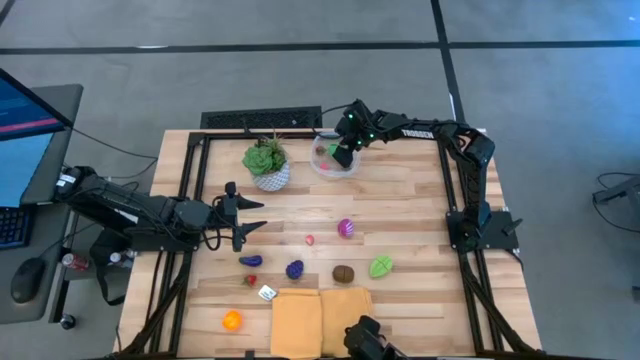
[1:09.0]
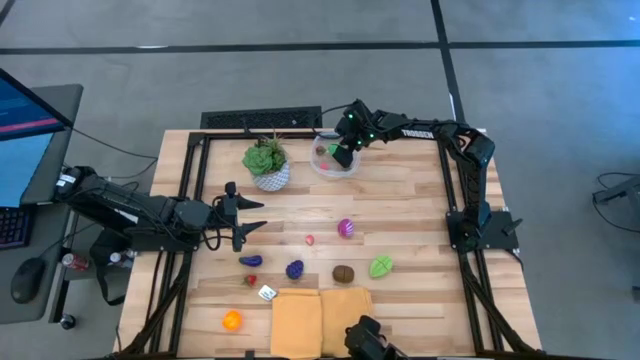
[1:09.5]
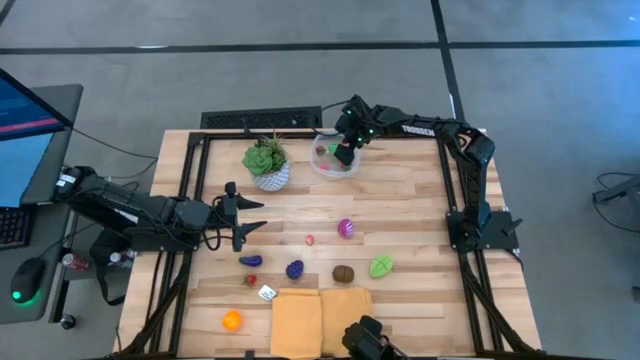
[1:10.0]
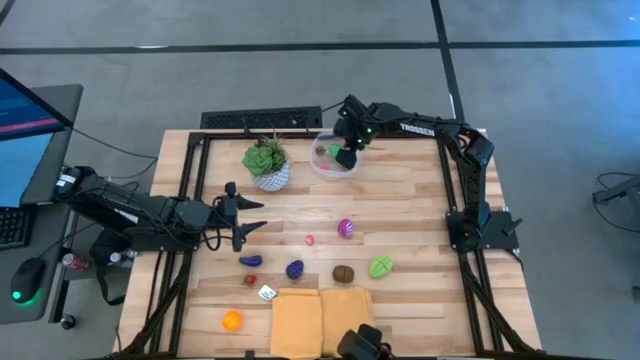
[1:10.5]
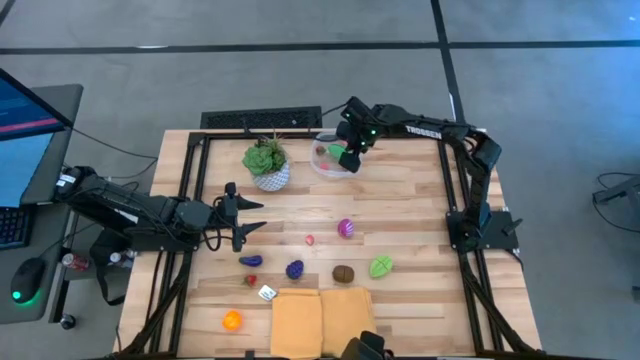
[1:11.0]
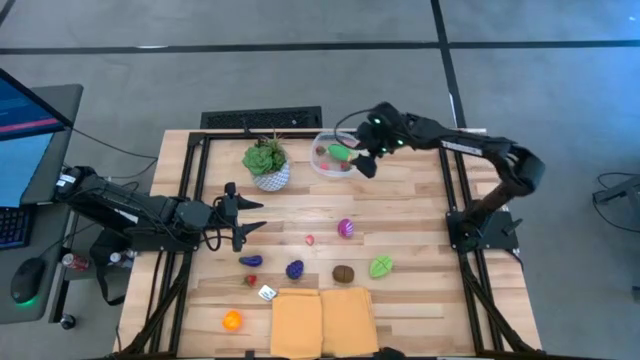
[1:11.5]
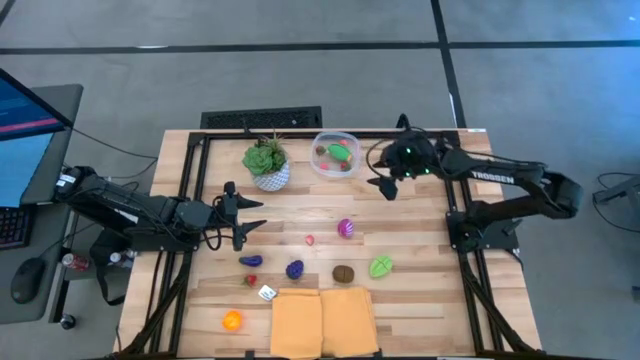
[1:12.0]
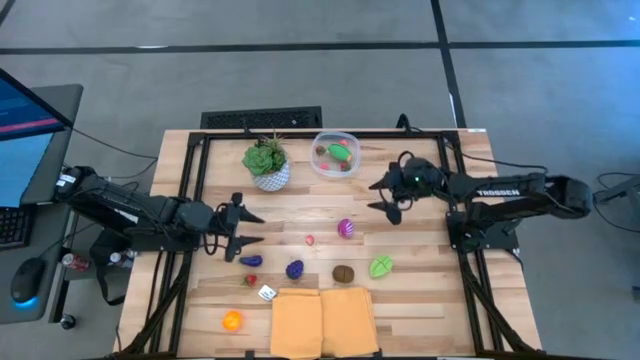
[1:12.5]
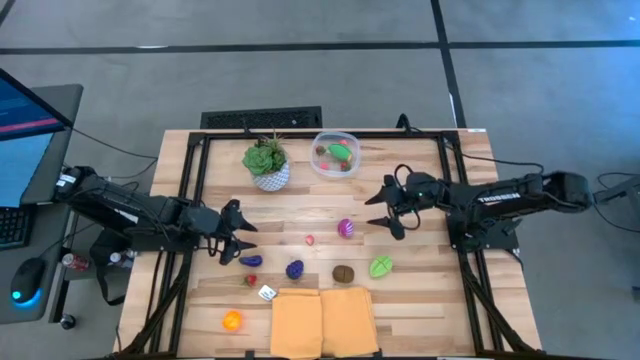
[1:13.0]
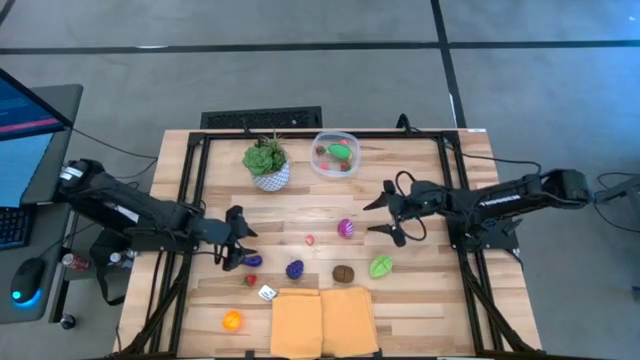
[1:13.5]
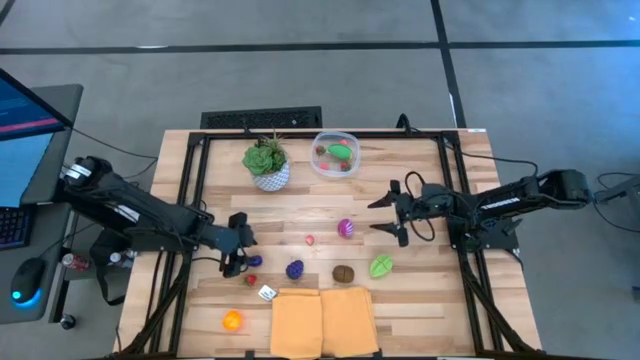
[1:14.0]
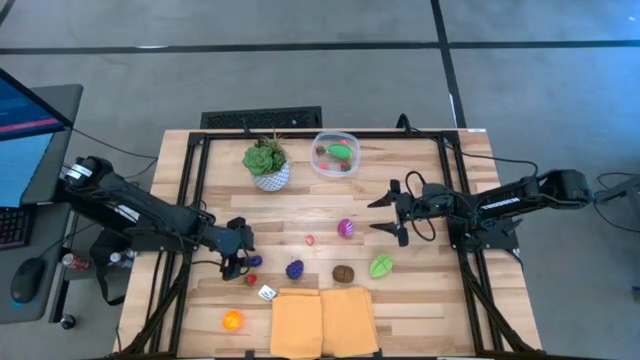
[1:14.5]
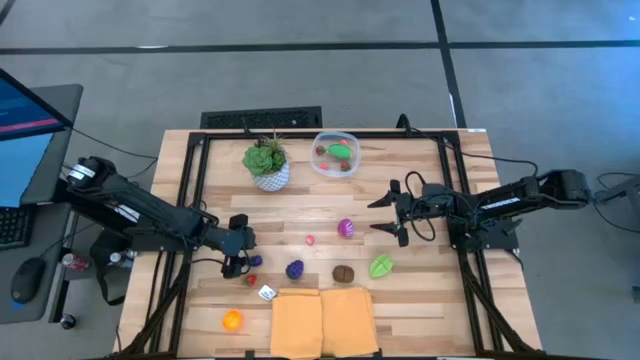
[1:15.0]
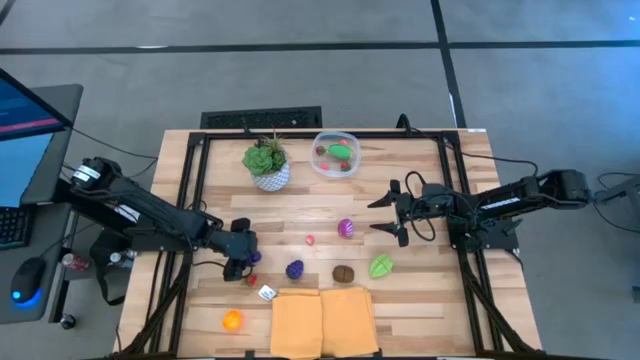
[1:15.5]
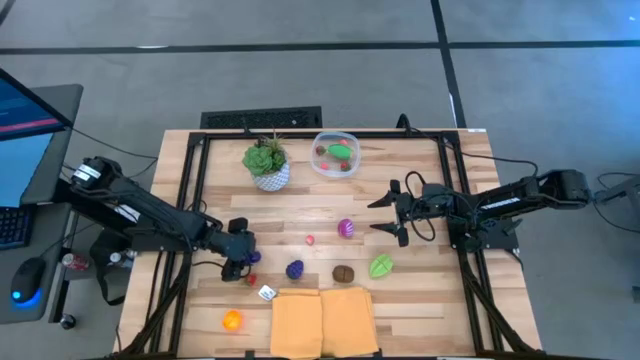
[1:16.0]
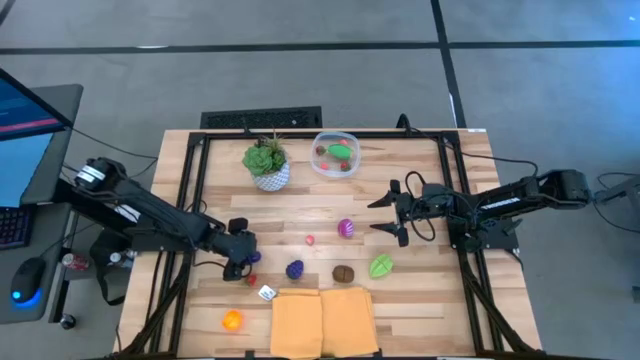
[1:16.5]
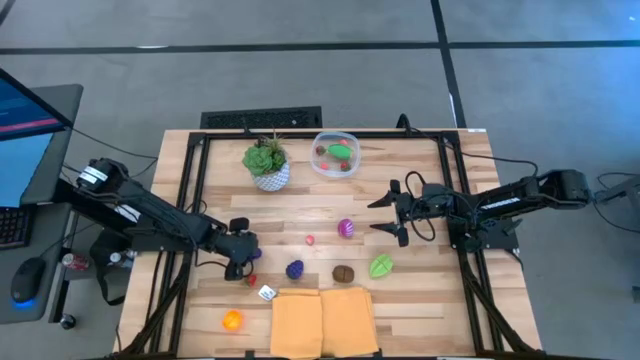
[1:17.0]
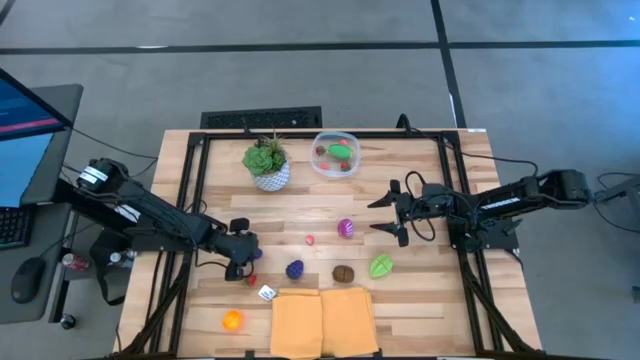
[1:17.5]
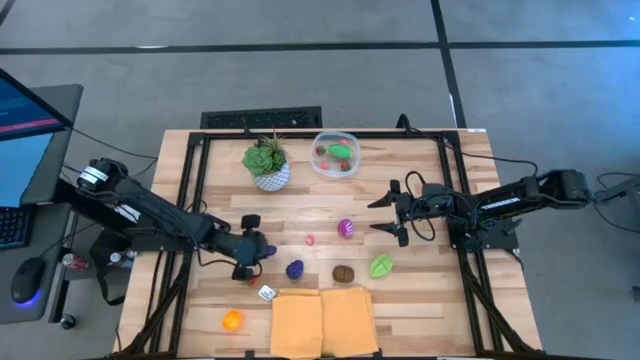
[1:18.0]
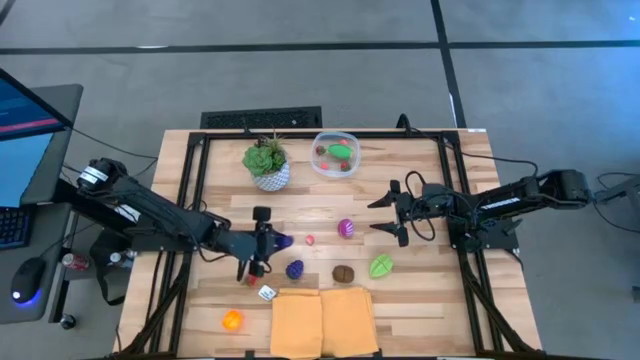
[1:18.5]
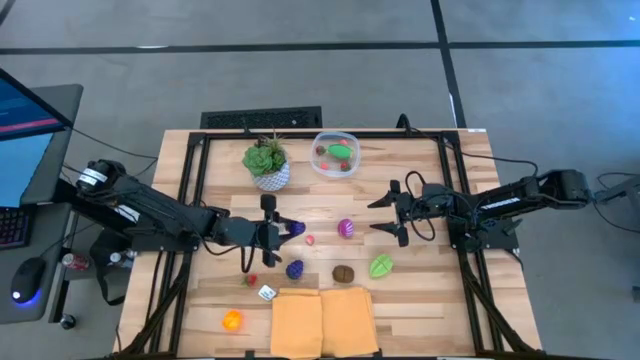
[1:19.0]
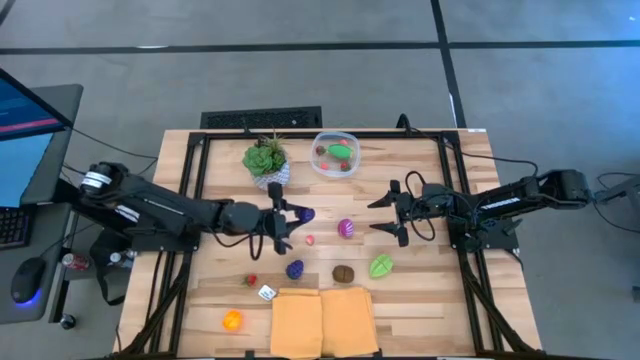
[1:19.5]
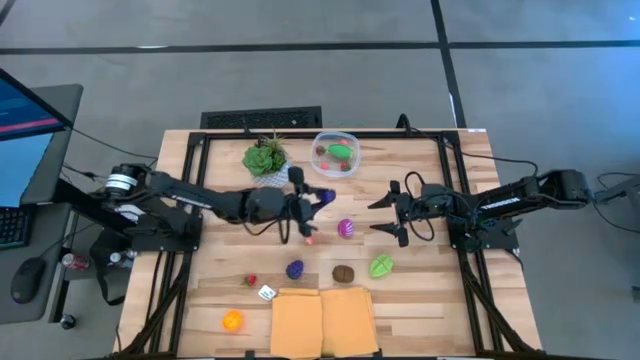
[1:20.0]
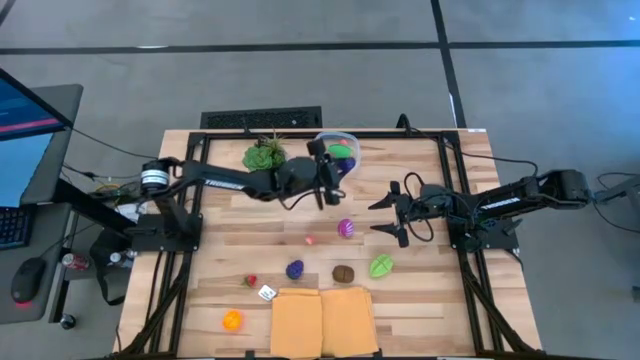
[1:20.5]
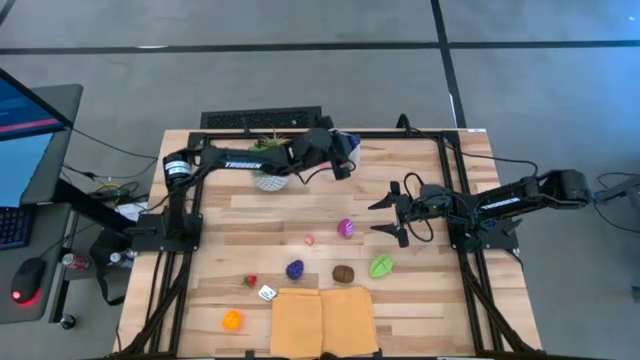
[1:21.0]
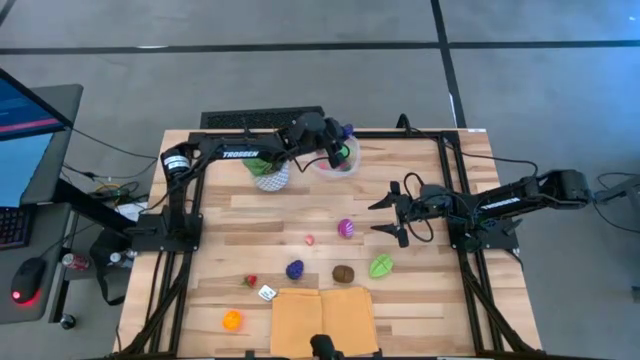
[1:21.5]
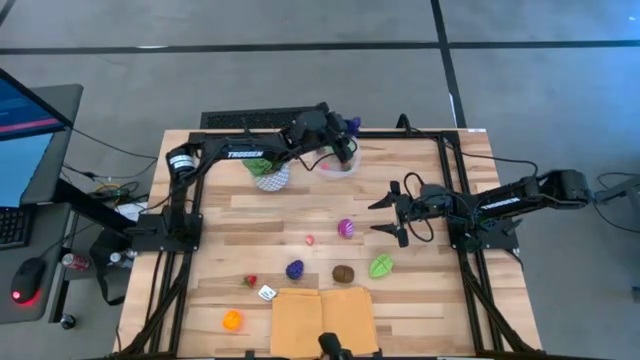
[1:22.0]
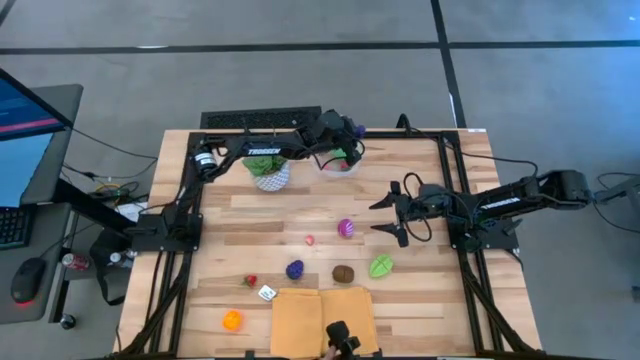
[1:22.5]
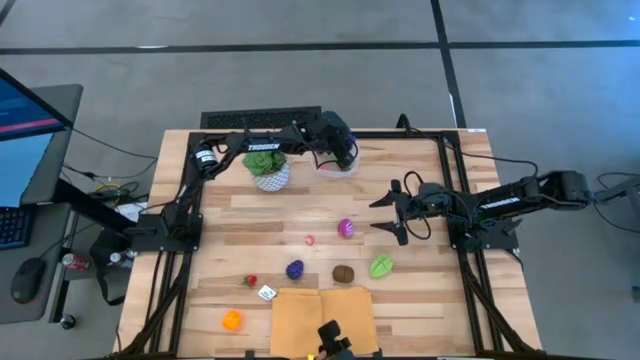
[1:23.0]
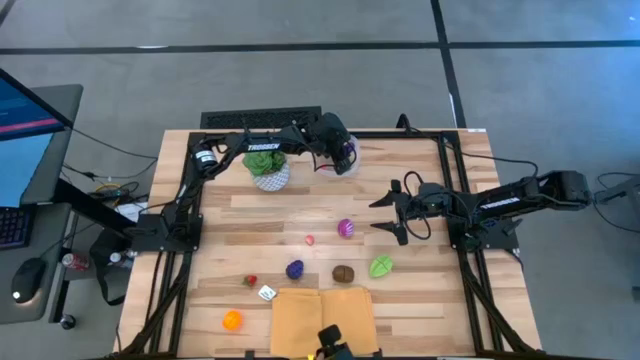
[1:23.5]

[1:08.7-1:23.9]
Task: Pick and placing Produce into tupperware
Put the eggplant into the transparent bin
